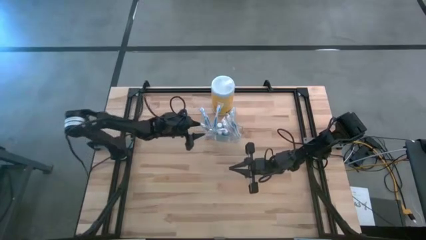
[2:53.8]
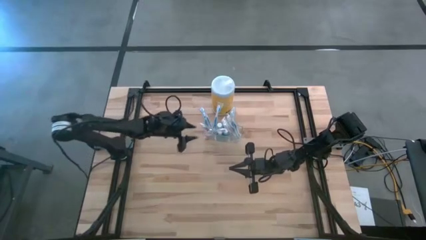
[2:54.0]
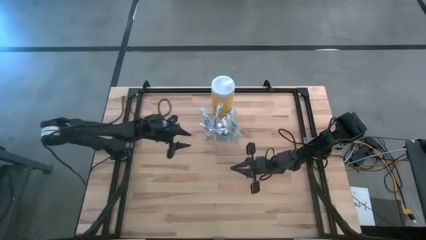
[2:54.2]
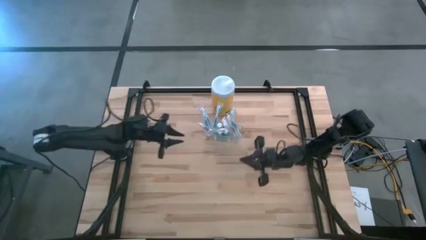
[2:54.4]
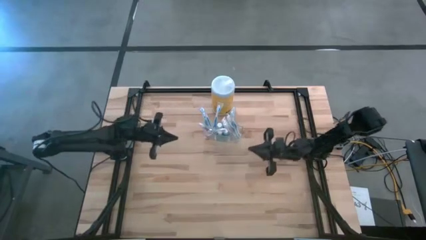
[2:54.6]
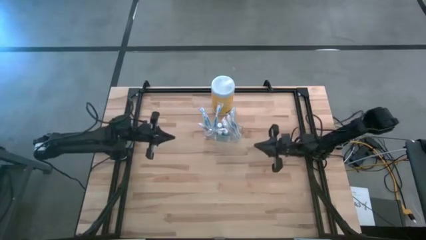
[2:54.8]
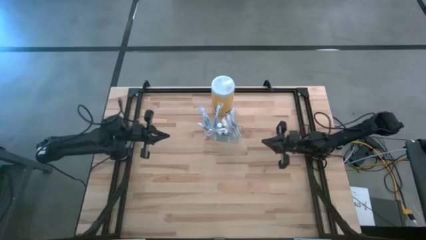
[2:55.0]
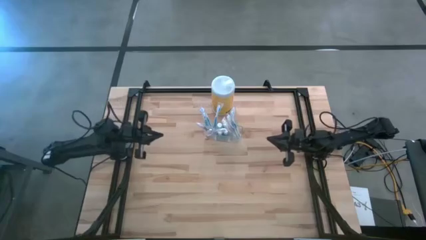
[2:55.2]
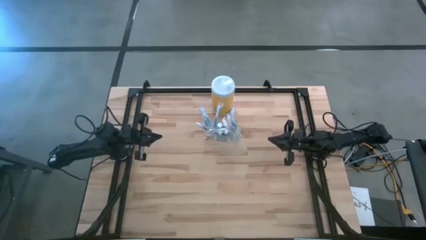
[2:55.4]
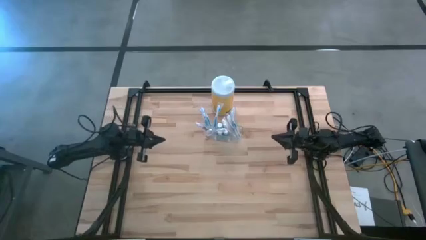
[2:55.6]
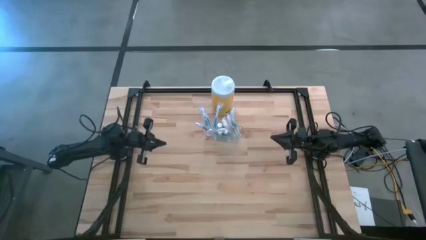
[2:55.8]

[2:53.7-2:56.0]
Task: Pick & Place toothbrushing station
Return to Home Position

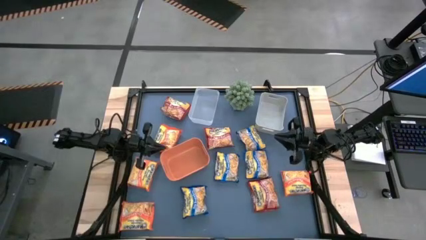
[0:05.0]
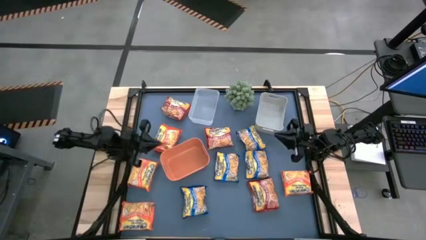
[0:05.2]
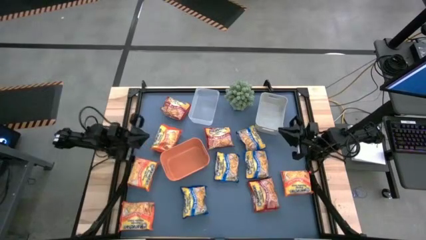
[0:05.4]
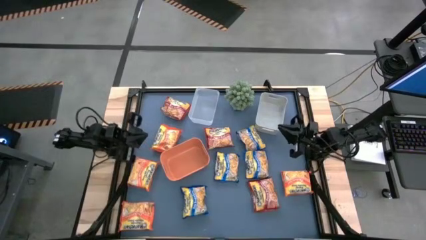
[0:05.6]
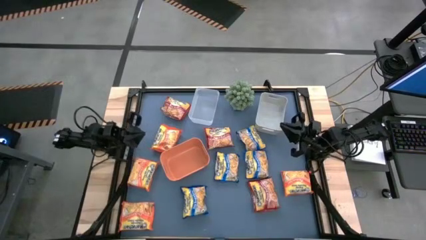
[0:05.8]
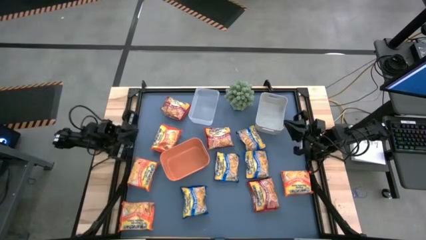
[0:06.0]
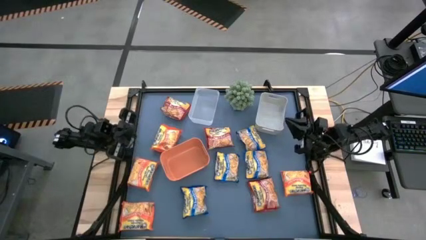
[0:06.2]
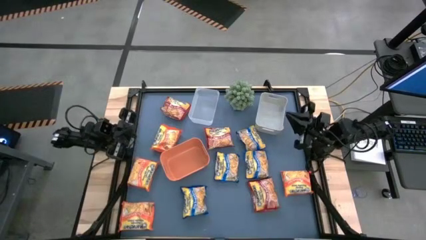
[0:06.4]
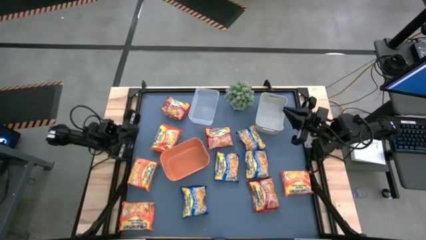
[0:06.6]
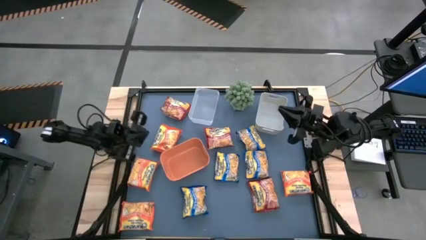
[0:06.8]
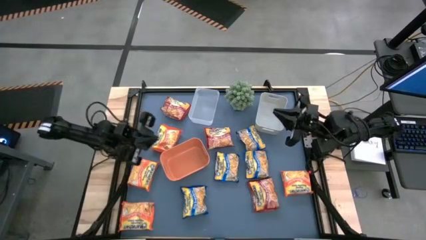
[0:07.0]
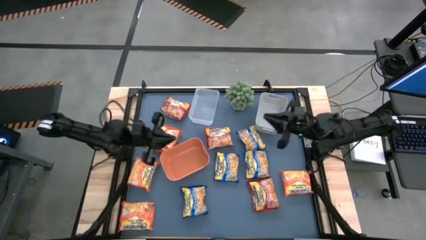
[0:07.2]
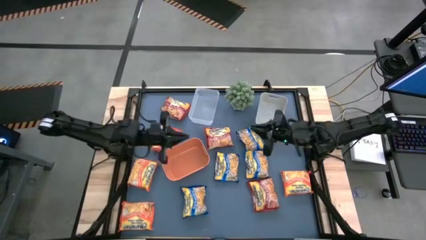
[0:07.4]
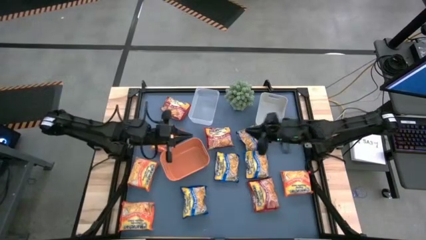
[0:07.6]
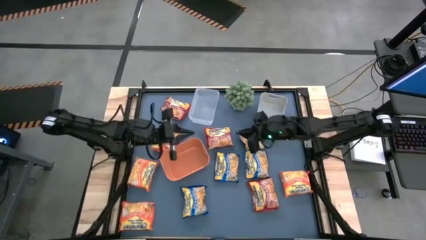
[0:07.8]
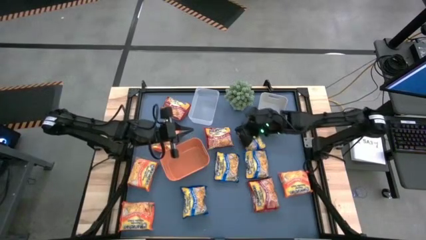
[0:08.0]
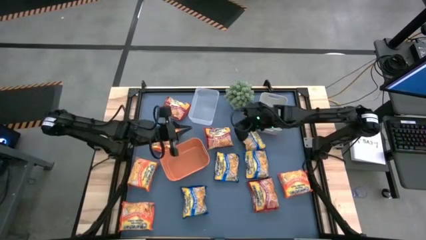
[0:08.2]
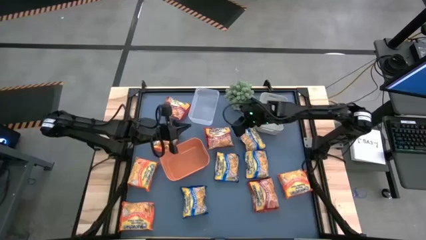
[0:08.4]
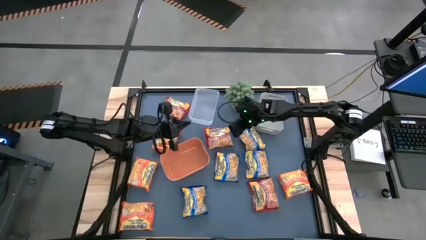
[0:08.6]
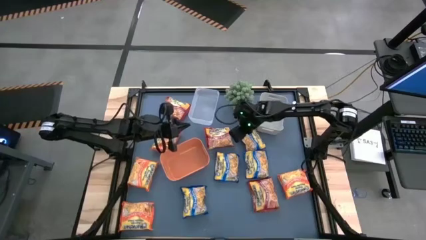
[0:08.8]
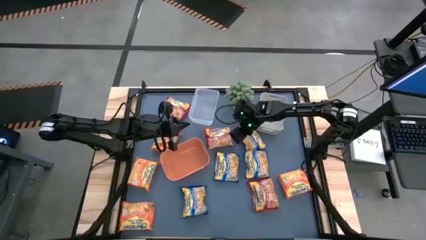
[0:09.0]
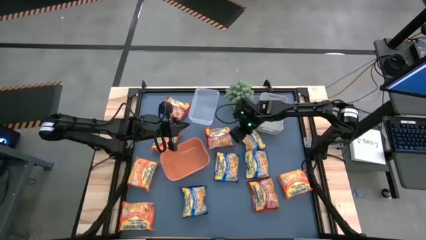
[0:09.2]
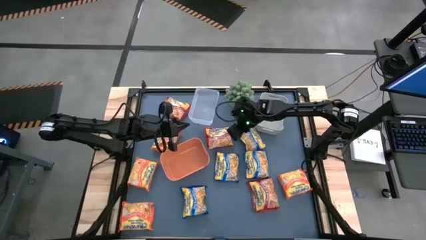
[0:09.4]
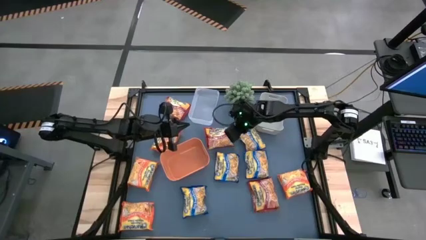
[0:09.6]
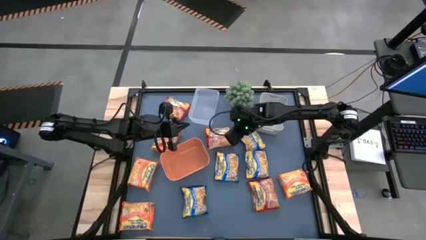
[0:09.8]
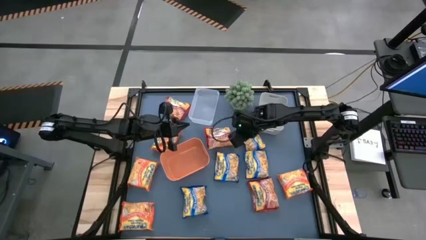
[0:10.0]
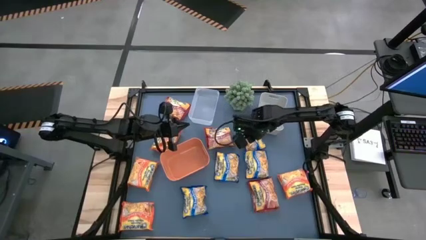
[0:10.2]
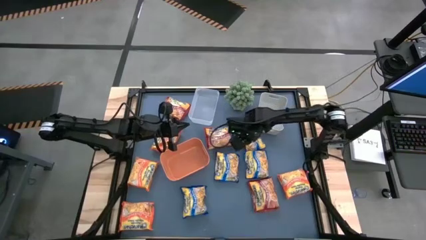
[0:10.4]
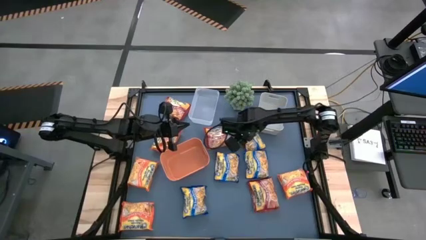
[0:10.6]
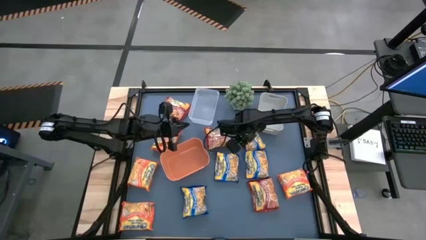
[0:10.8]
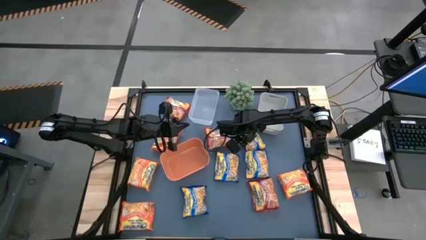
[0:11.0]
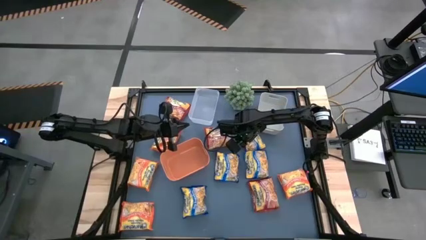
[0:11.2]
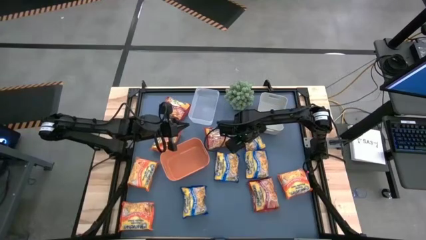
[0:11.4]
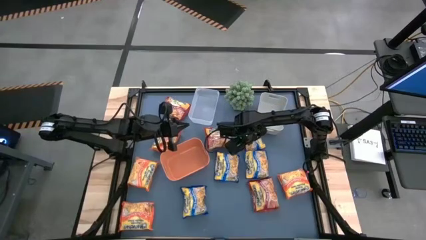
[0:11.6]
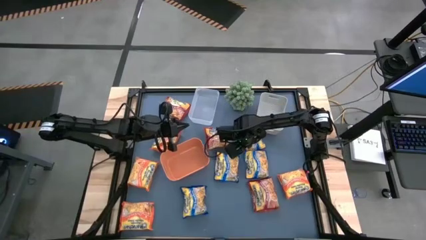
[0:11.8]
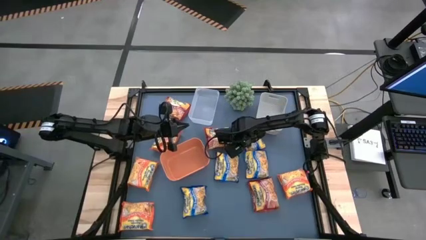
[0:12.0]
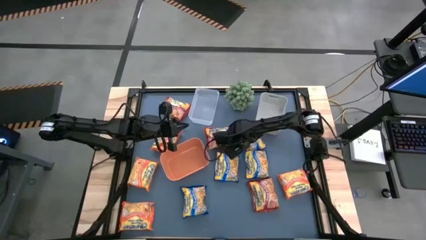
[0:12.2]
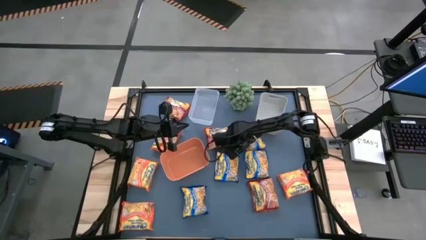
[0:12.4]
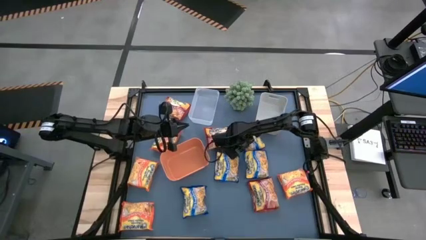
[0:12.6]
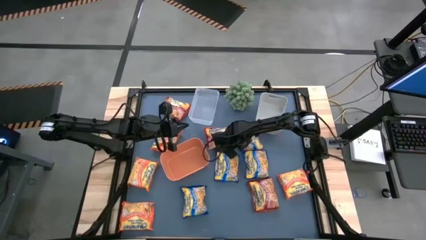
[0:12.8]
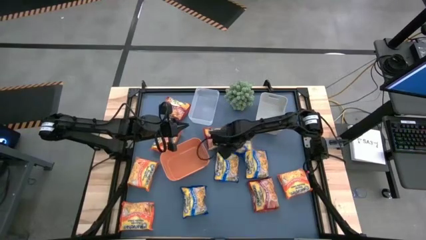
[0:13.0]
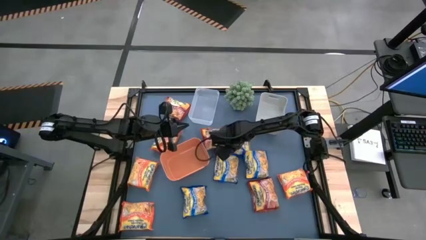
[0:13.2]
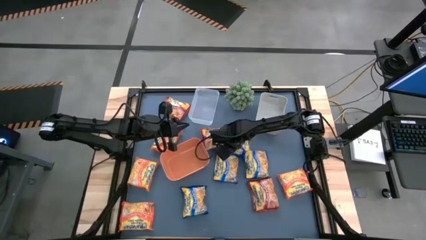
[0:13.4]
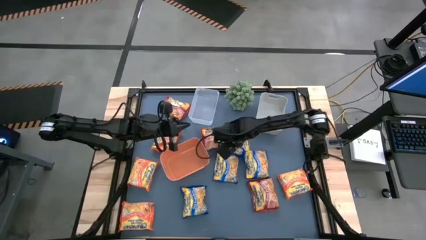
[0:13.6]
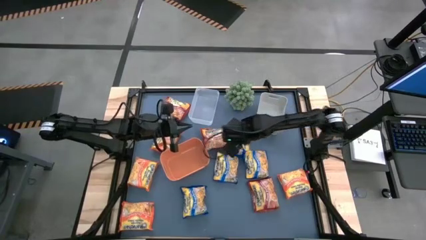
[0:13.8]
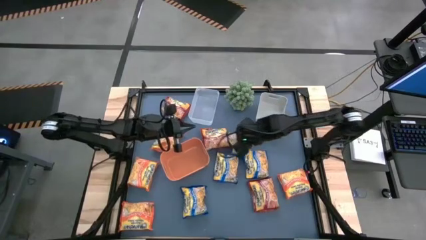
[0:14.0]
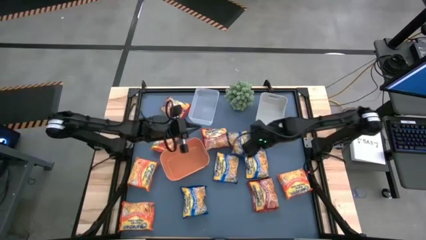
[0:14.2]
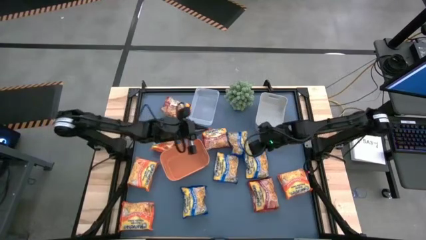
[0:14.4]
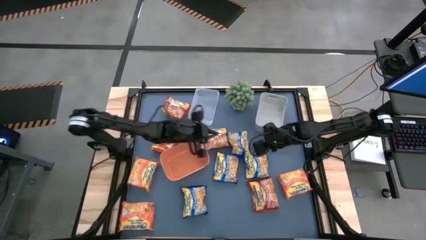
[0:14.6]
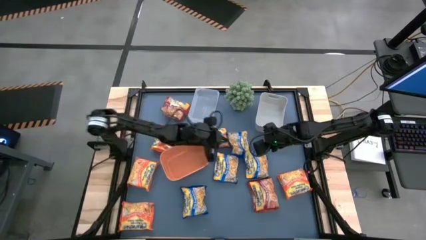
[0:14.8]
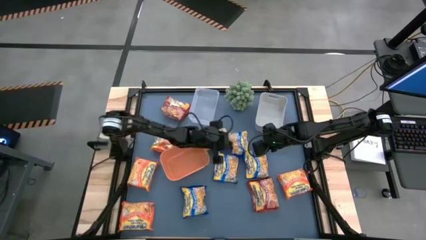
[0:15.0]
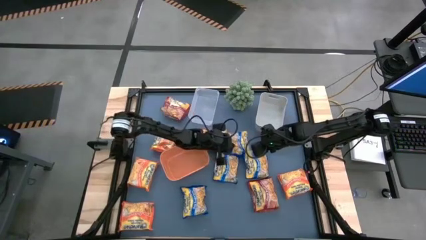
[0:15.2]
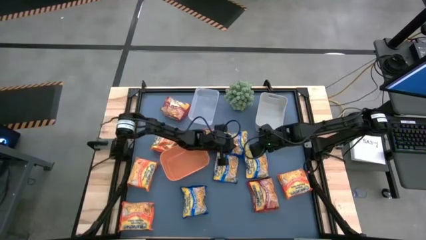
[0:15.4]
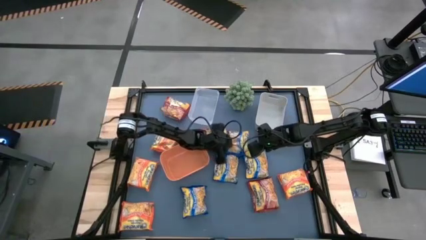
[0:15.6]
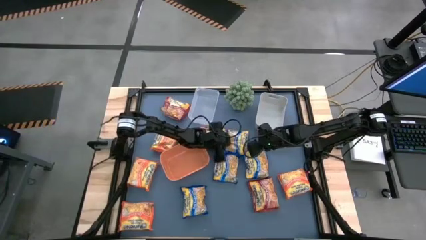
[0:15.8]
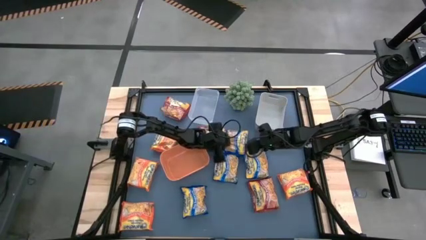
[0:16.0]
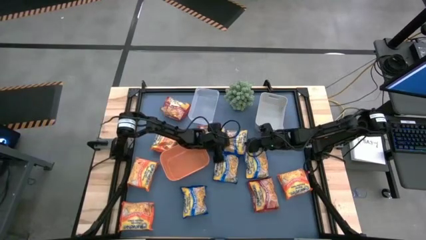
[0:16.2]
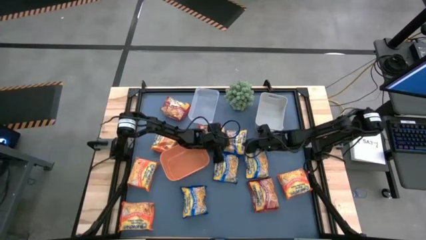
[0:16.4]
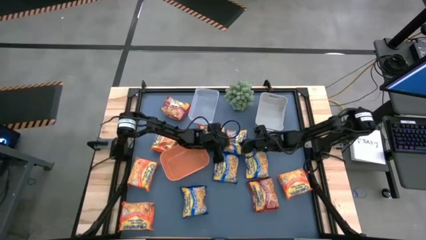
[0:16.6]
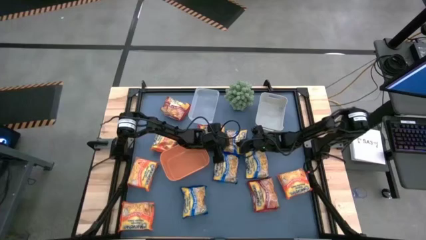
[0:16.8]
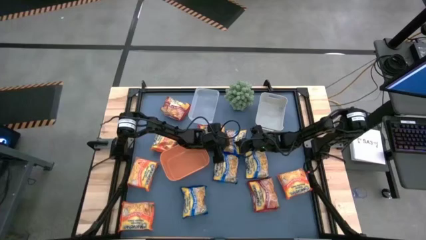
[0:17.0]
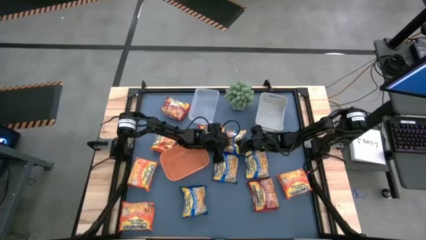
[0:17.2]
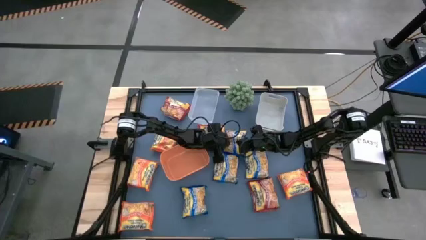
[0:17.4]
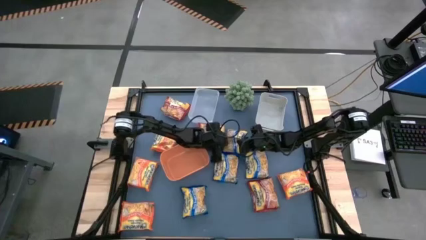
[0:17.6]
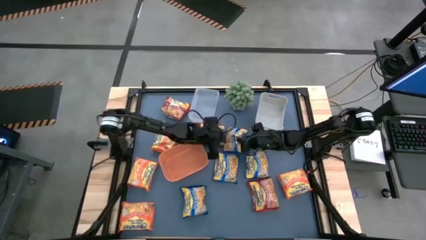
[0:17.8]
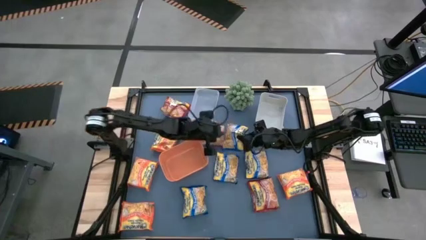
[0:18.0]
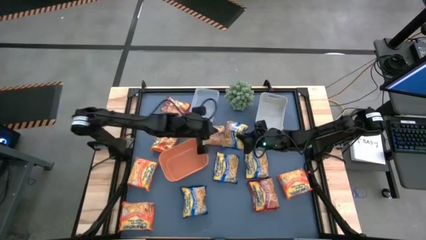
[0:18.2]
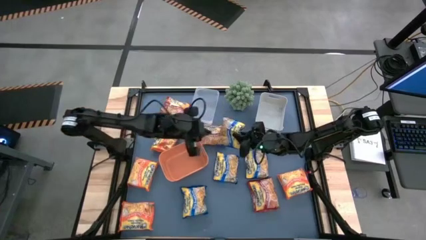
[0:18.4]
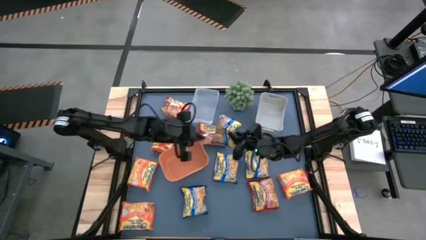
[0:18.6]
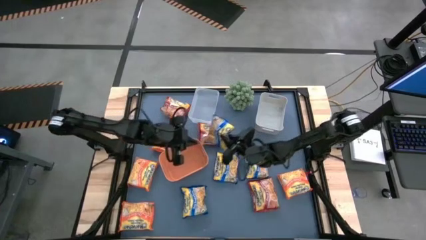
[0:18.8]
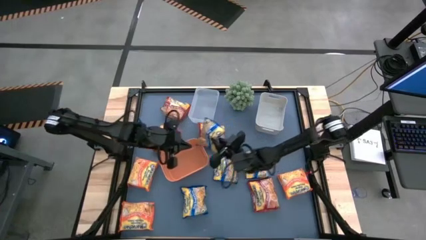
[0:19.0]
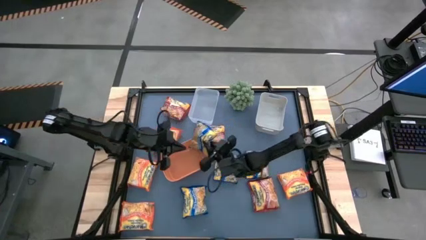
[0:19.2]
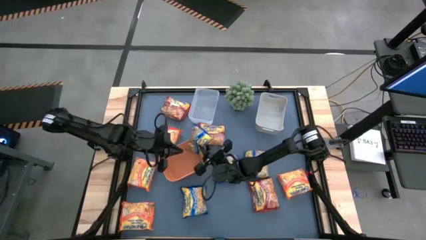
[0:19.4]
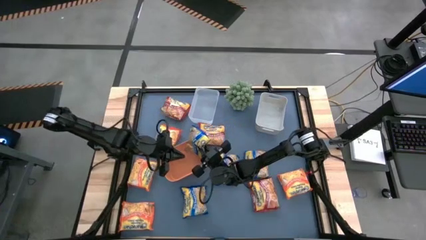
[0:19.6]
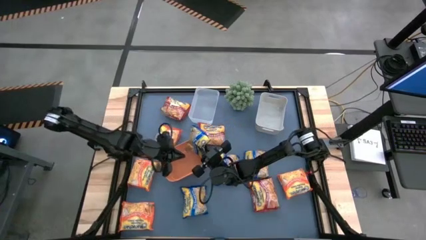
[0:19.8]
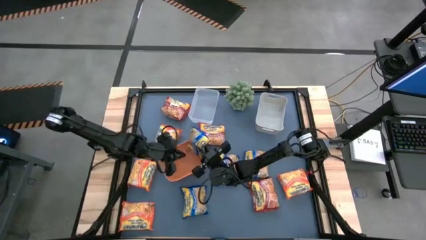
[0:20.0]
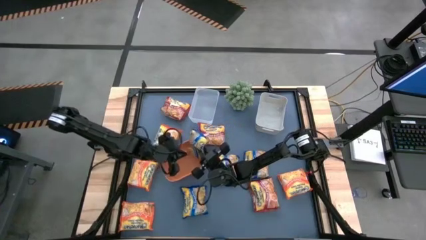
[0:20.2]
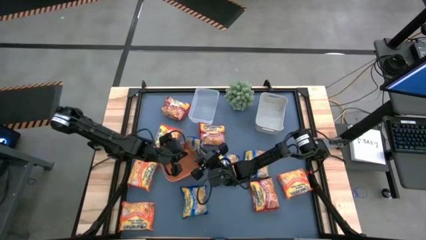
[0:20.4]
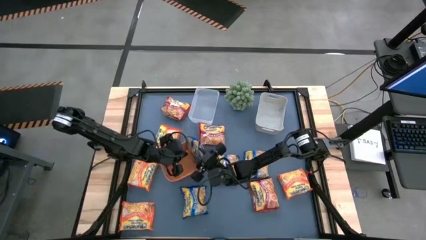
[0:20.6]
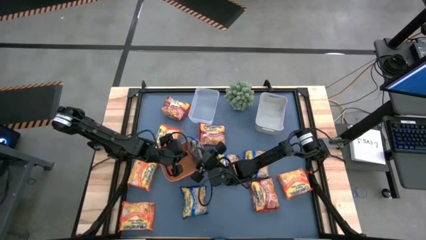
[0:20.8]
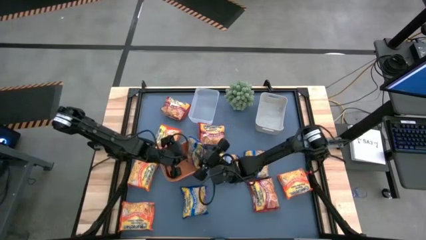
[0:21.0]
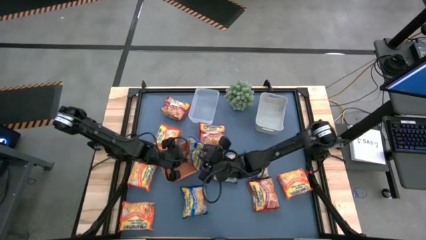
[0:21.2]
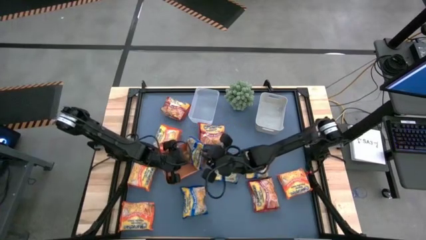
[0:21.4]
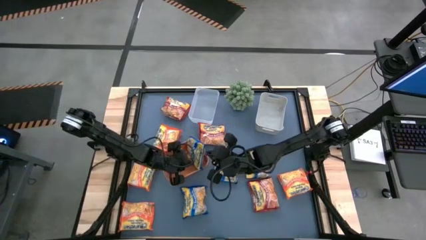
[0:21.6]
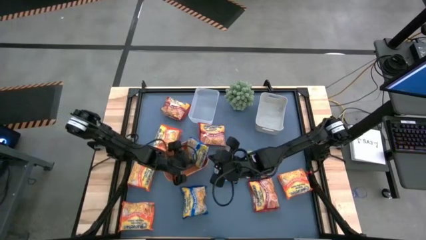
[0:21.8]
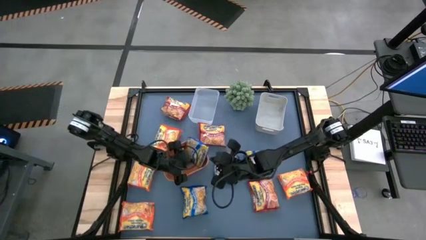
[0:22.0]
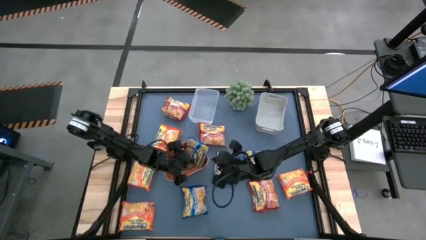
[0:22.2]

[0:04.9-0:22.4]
Task: Sort Maruchan noodles
Put the blue noodle pack into the orange bin
